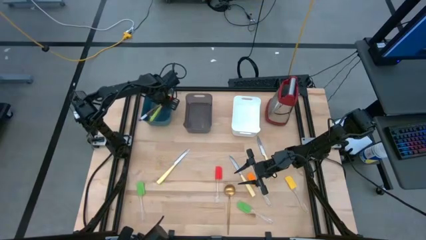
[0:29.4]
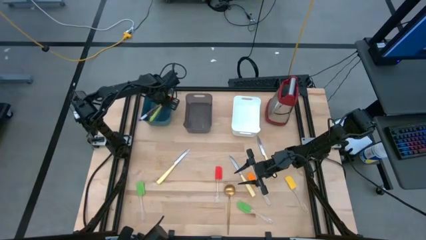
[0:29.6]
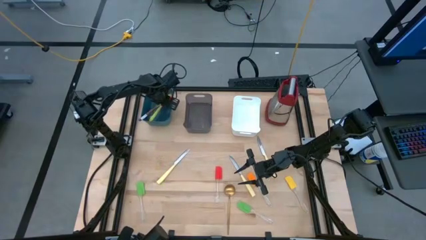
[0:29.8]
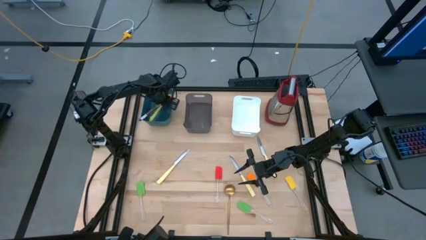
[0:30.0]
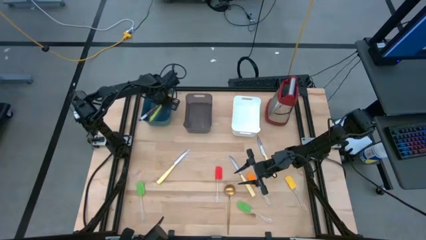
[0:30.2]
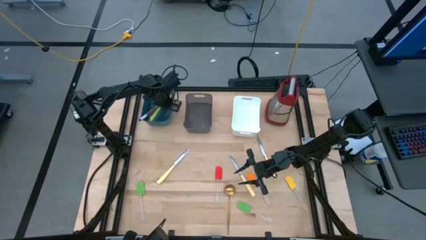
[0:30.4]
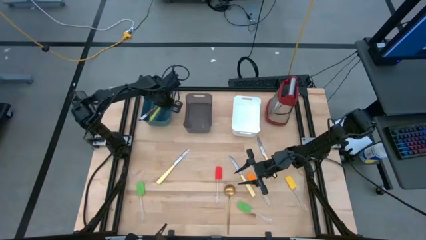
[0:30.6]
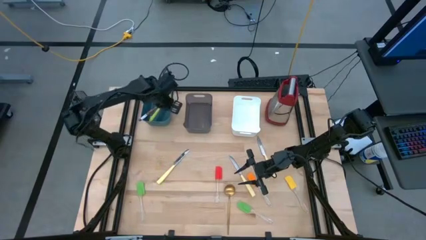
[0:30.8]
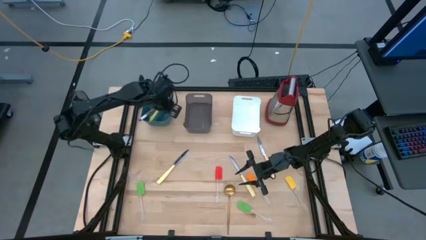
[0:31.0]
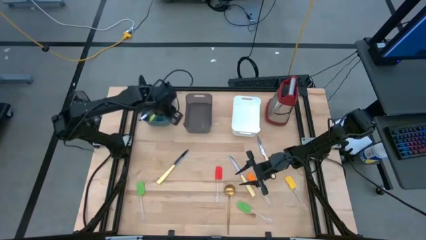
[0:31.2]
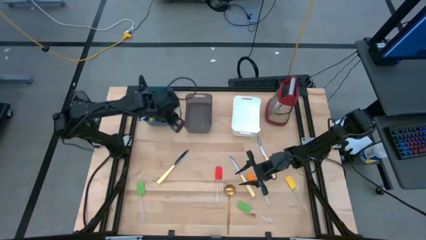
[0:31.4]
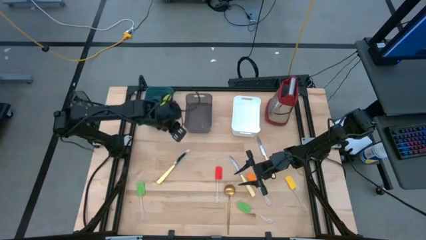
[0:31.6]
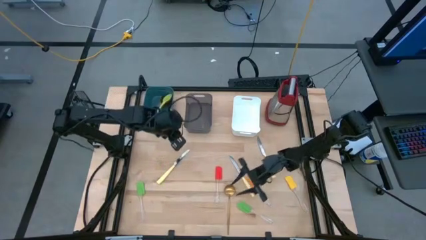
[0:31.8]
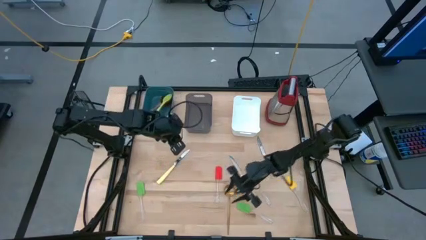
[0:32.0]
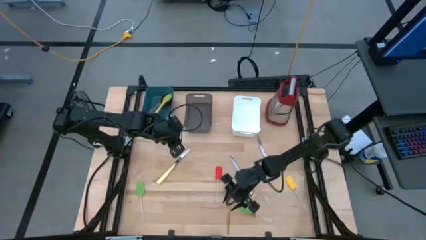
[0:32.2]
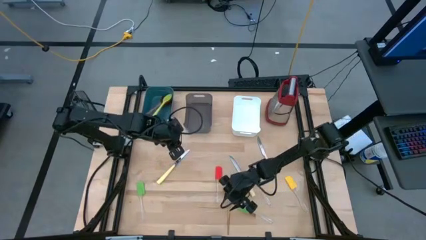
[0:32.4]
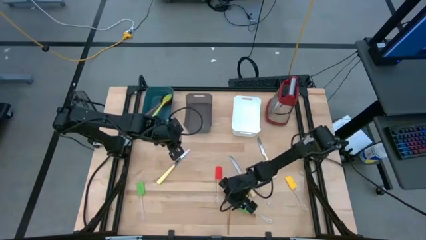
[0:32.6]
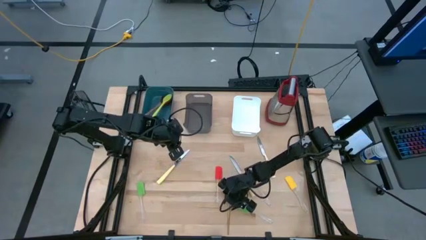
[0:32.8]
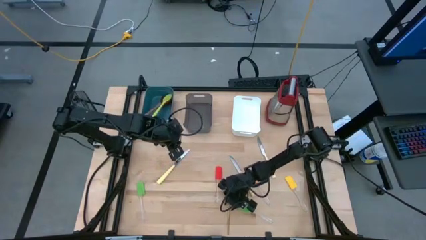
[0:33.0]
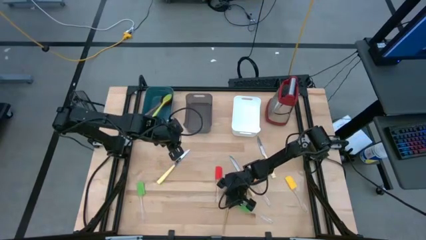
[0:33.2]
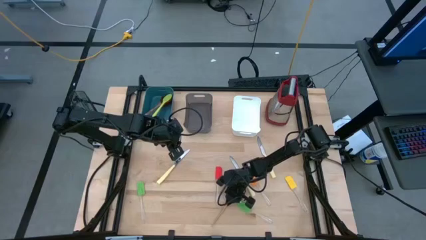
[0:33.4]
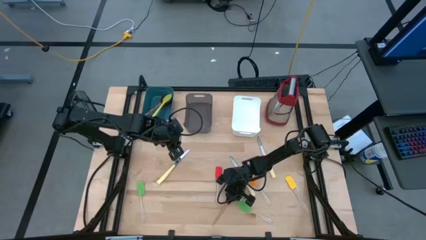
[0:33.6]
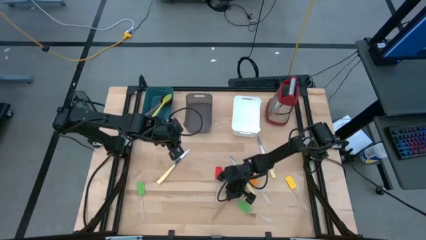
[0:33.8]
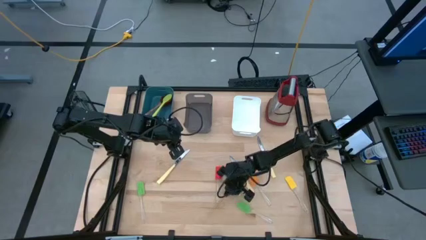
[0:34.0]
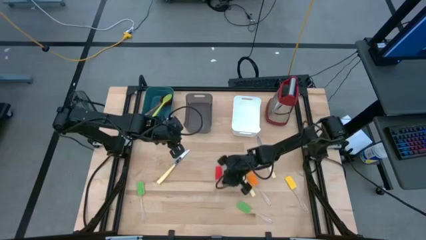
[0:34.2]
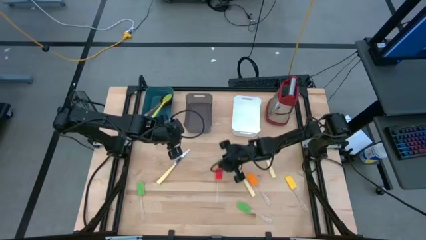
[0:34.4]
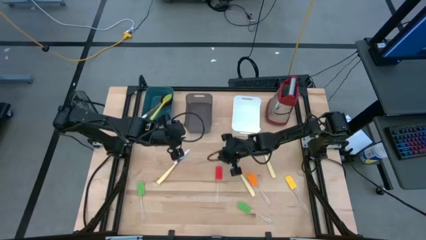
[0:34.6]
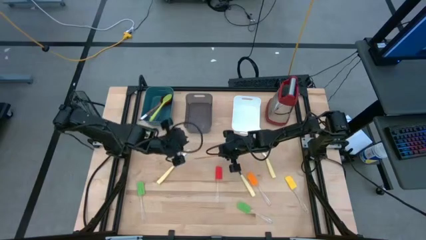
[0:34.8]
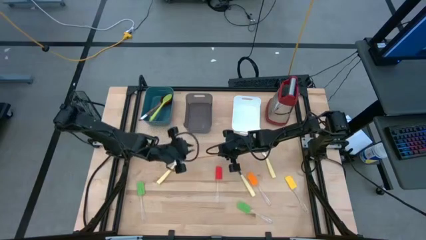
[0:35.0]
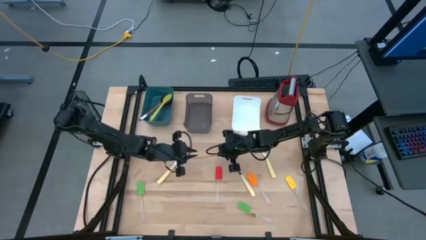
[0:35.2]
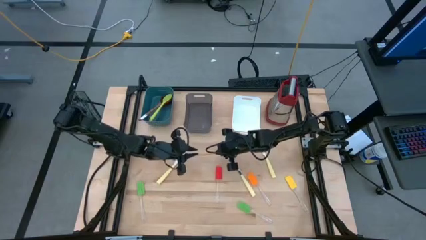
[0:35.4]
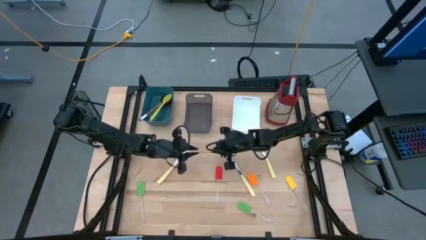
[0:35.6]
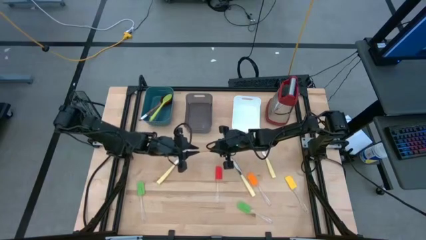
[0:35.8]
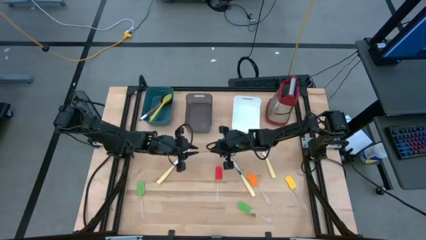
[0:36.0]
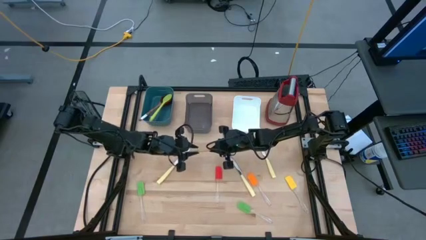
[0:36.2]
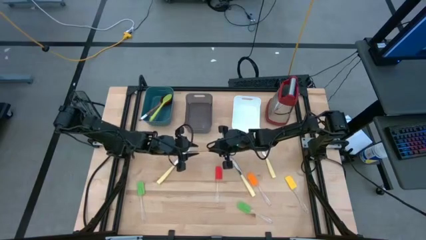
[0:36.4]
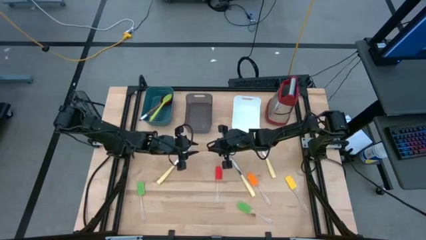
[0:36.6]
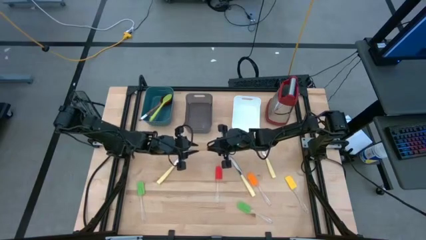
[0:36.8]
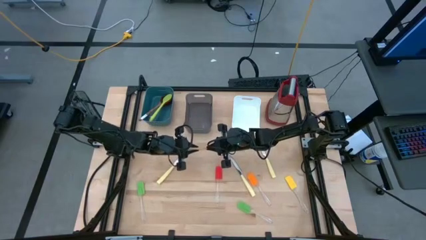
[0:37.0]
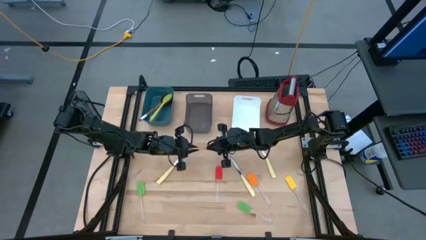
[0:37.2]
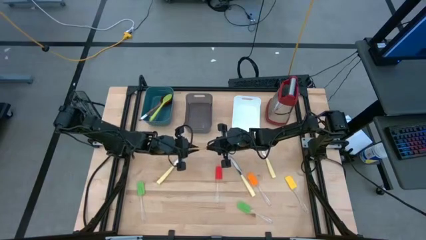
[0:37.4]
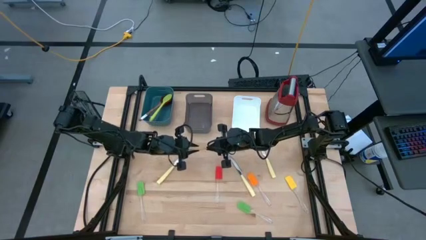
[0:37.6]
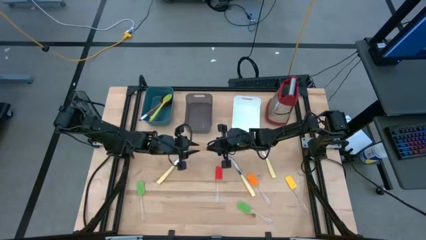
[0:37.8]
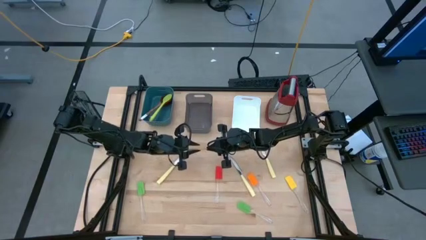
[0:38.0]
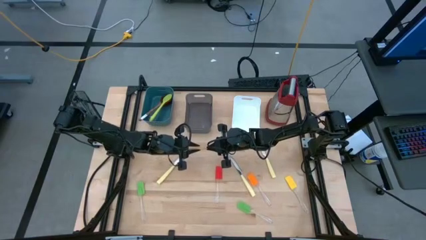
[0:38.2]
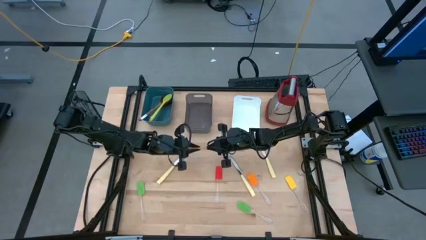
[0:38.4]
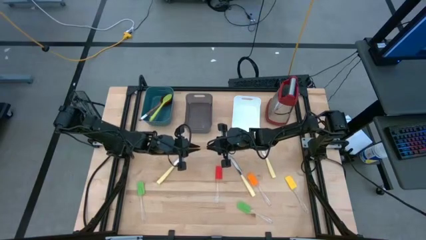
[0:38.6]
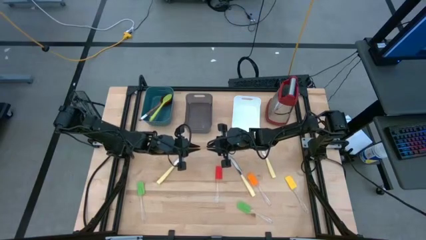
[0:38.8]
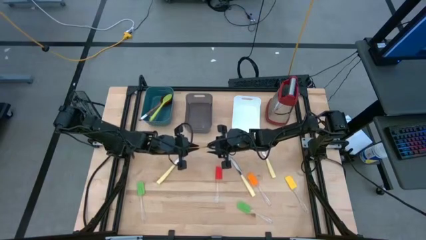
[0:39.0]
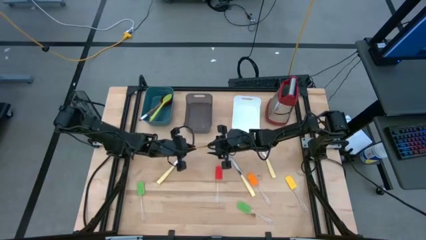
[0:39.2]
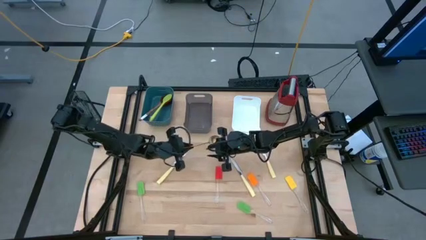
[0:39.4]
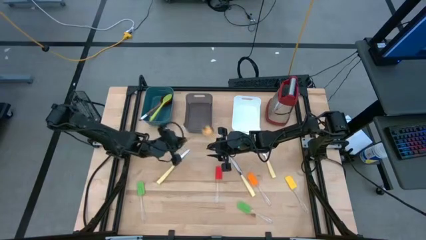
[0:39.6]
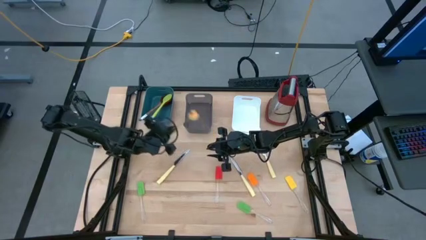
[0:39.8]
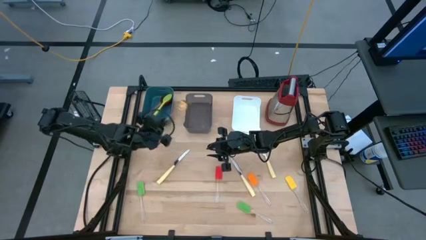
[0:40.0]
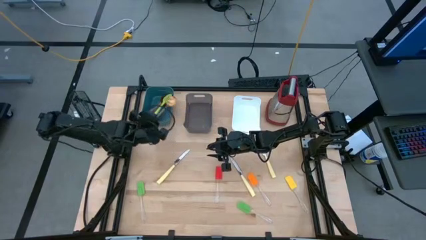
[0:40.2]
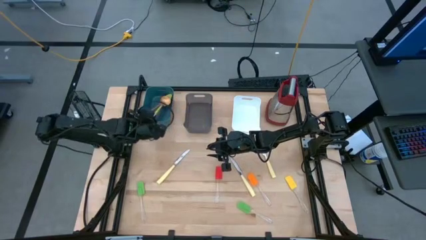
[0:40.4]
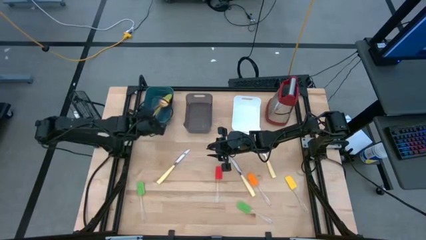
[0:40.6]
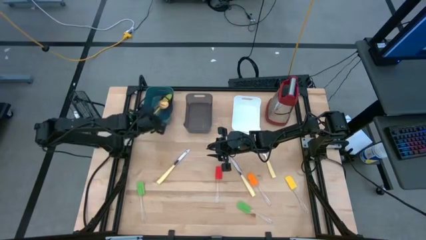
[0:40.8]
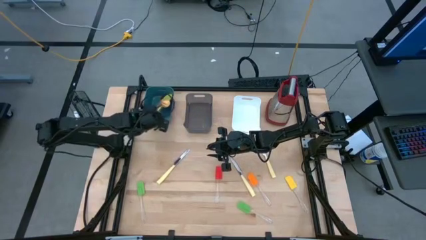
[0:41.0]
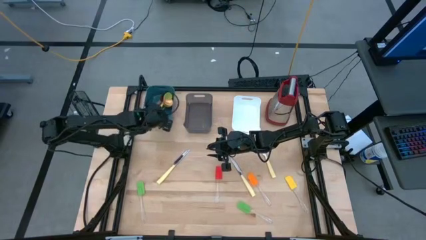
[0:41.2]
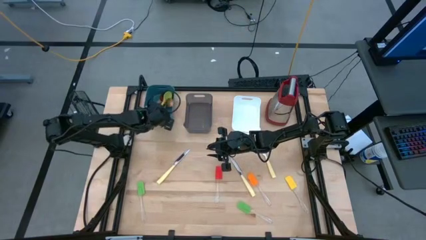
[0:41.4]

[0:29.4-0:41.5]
Task: Pick & Place Kitchen Items
Put the golden serving spoon into the blue bin
